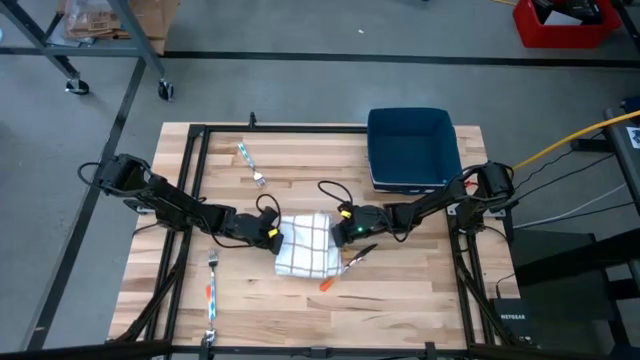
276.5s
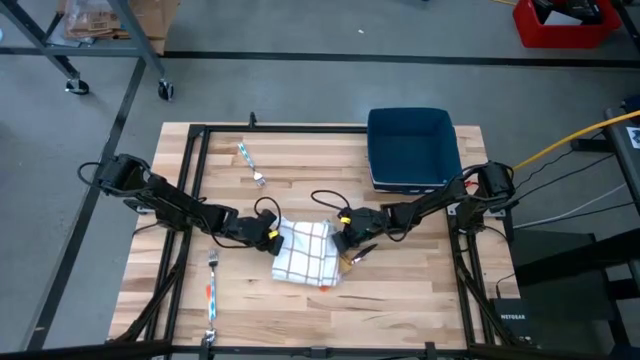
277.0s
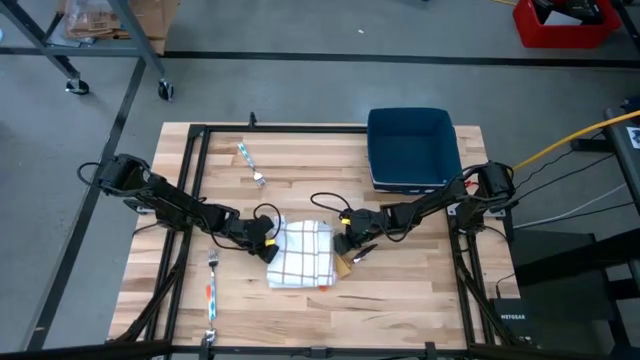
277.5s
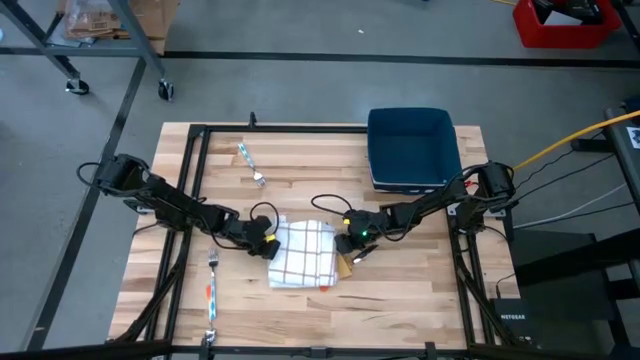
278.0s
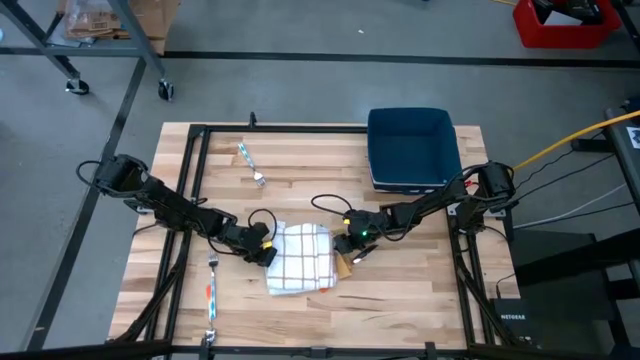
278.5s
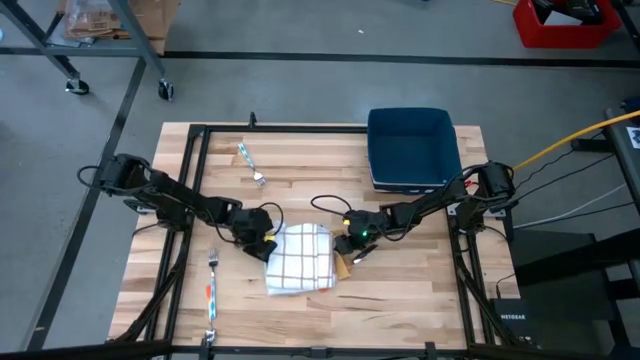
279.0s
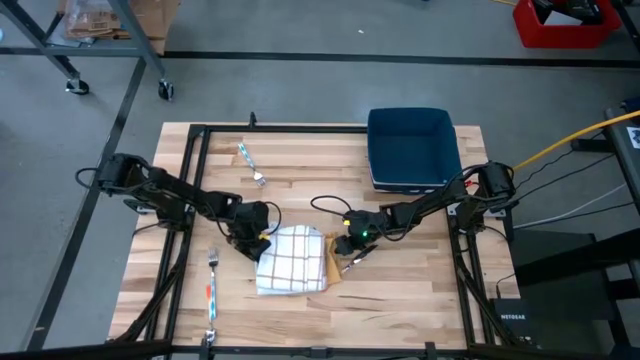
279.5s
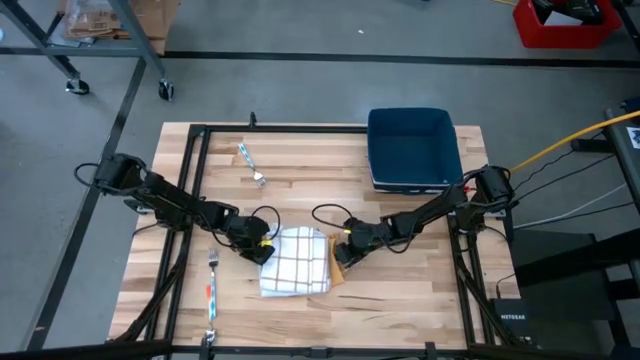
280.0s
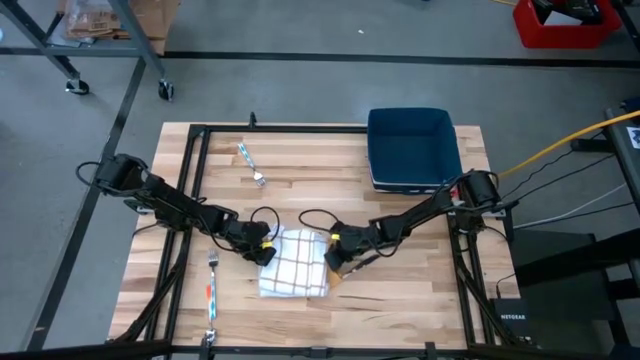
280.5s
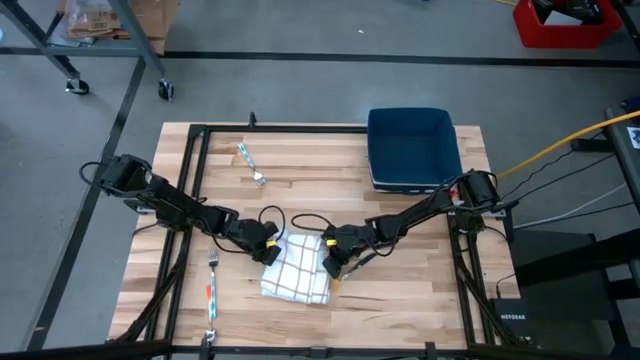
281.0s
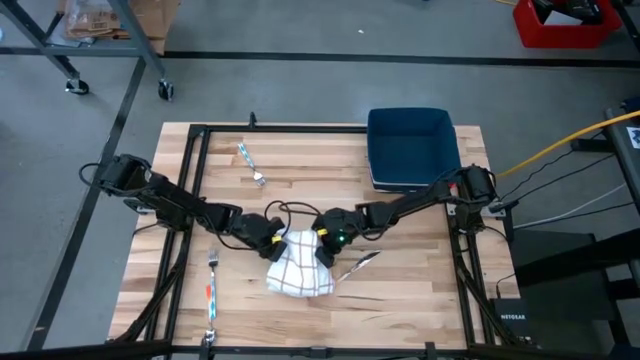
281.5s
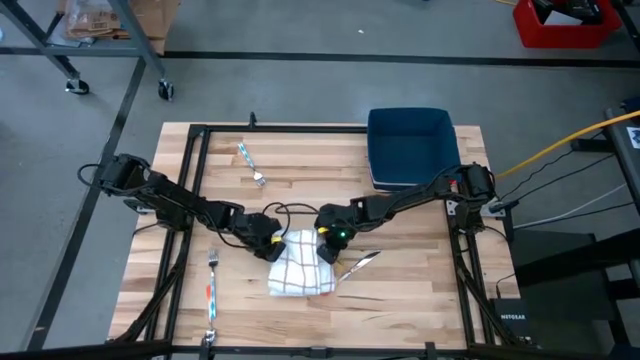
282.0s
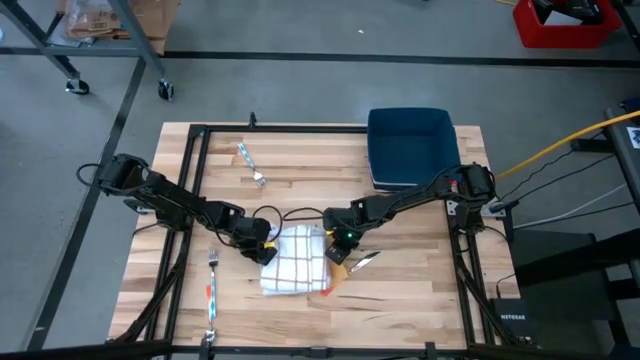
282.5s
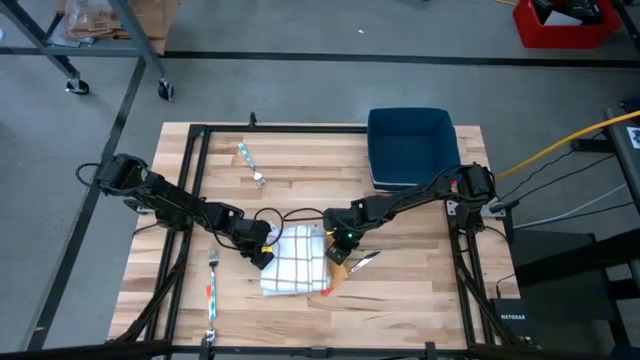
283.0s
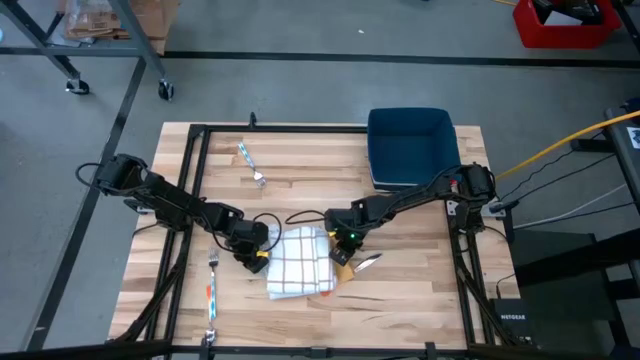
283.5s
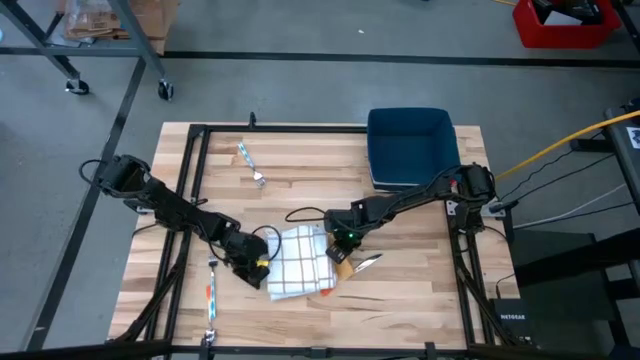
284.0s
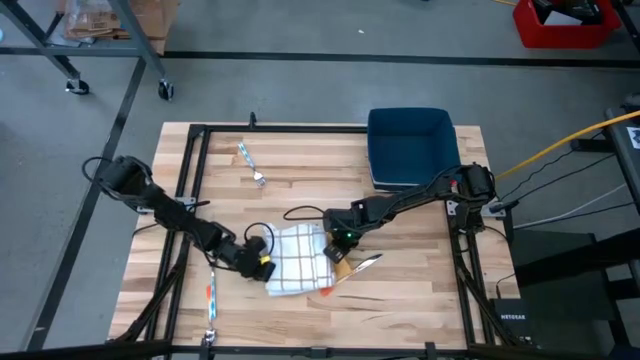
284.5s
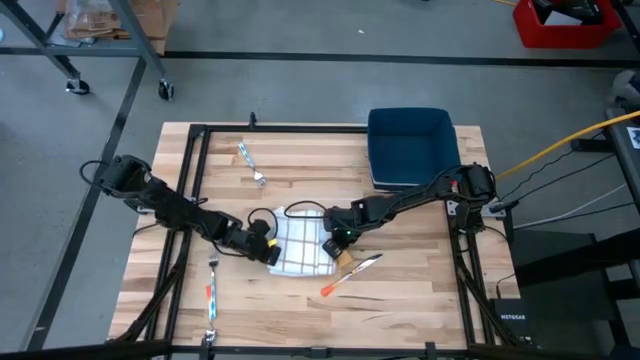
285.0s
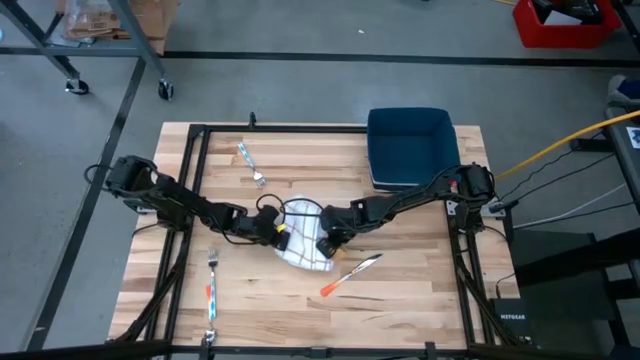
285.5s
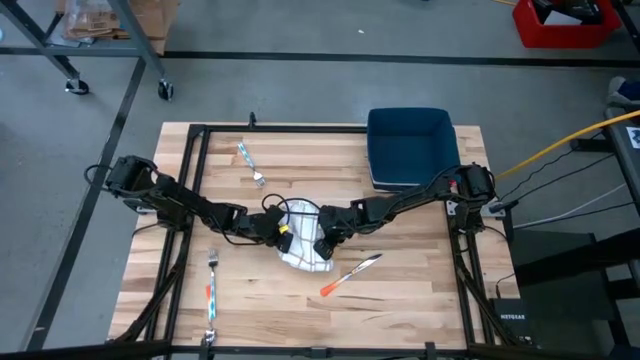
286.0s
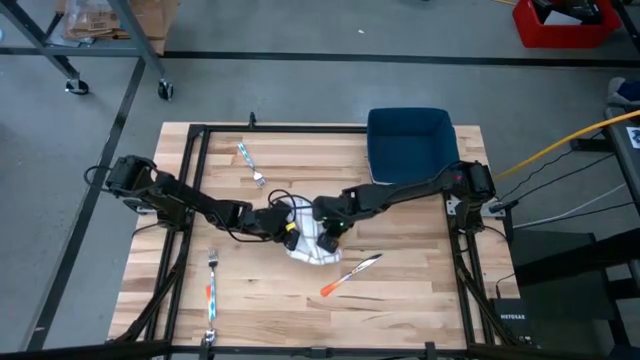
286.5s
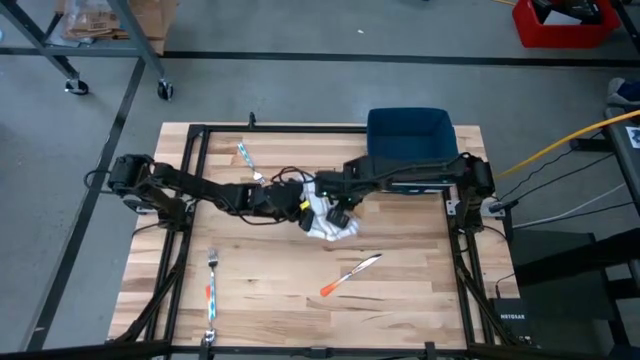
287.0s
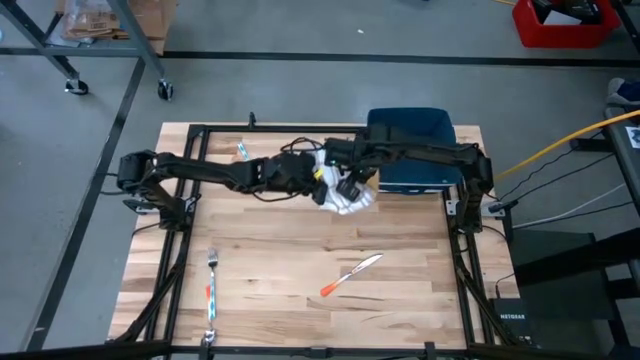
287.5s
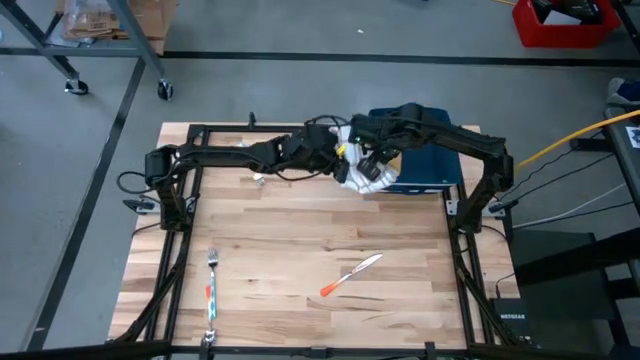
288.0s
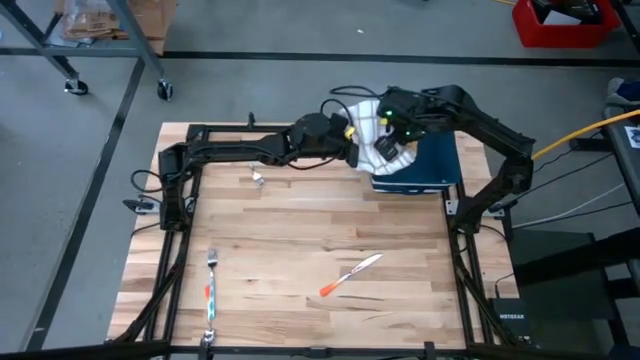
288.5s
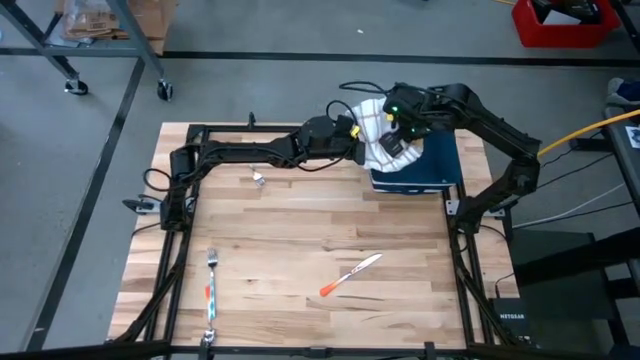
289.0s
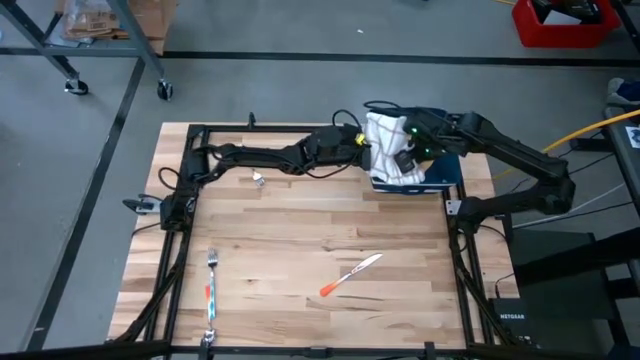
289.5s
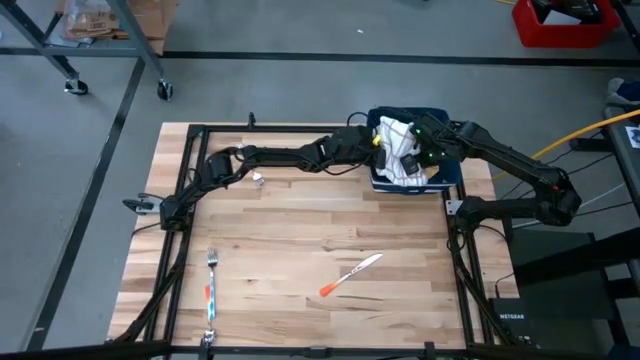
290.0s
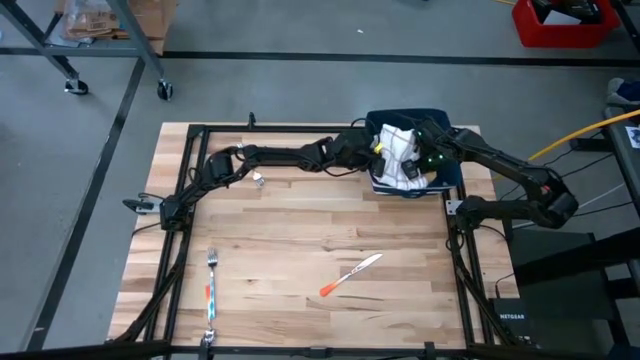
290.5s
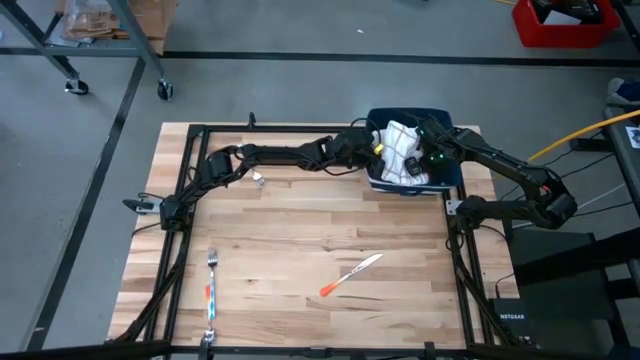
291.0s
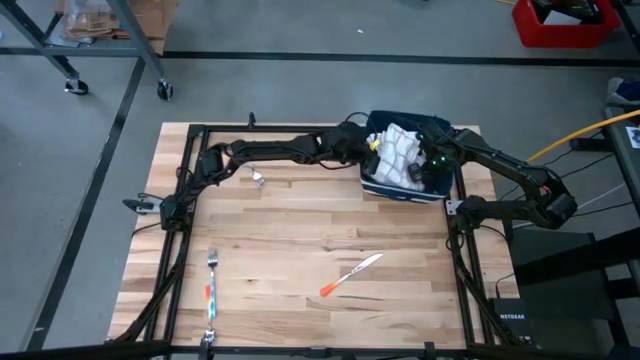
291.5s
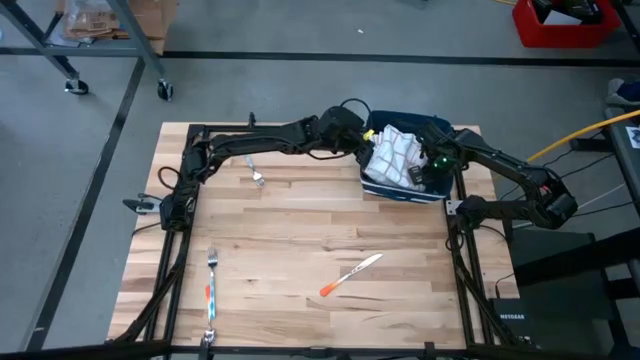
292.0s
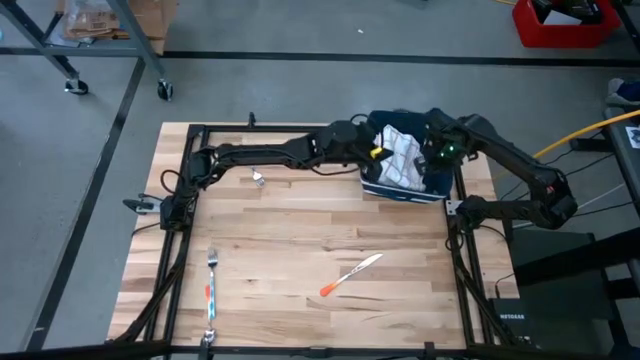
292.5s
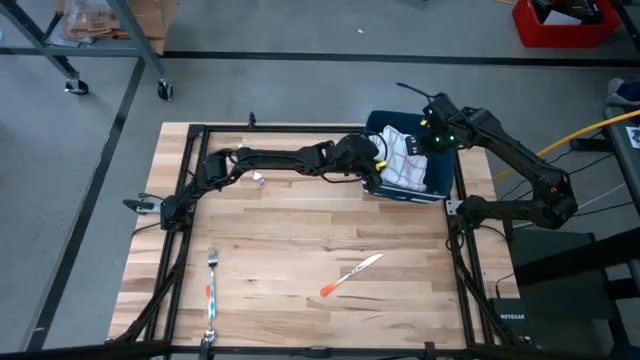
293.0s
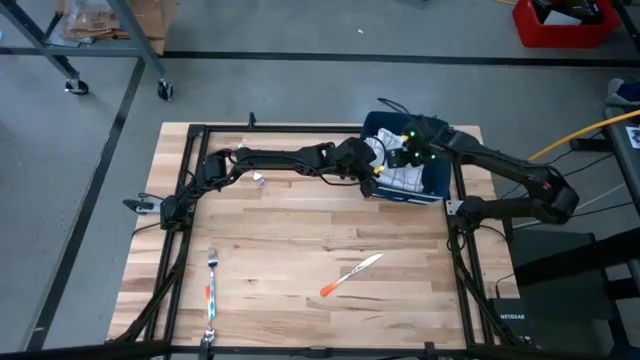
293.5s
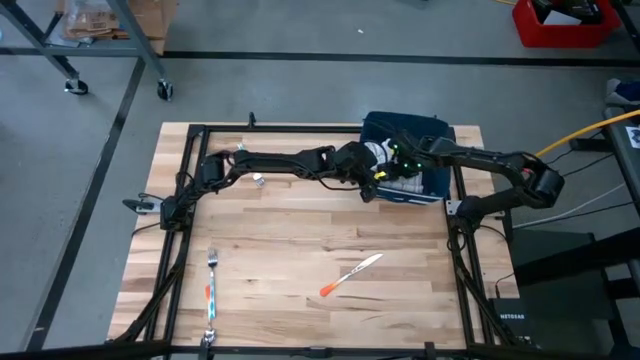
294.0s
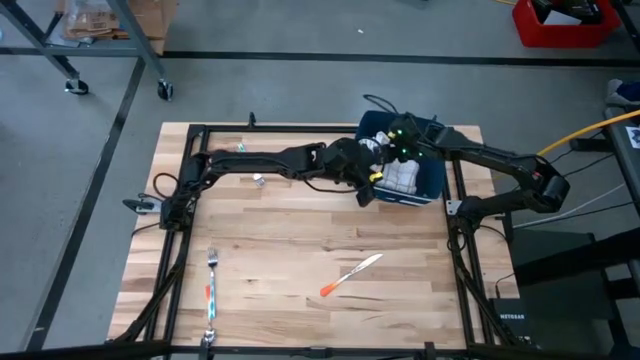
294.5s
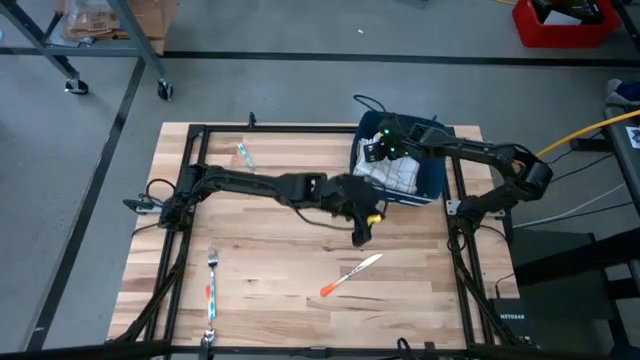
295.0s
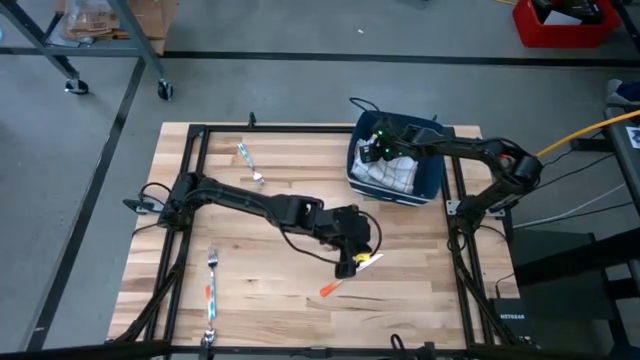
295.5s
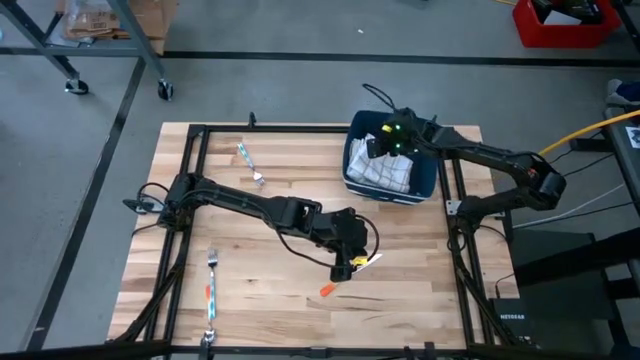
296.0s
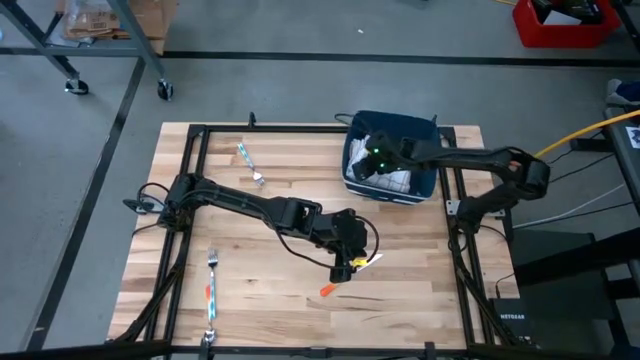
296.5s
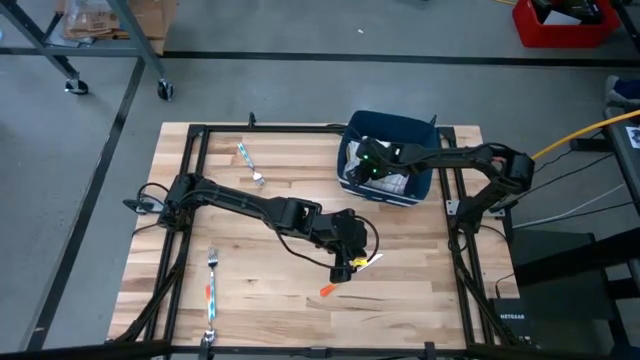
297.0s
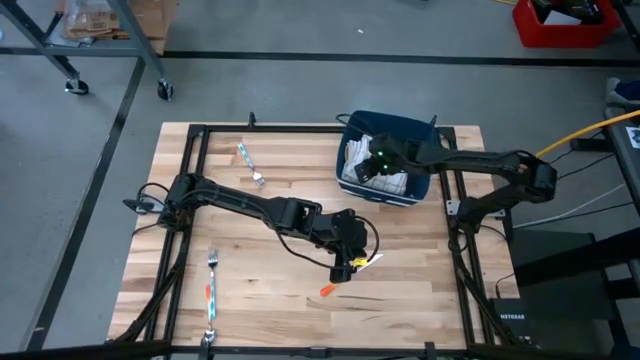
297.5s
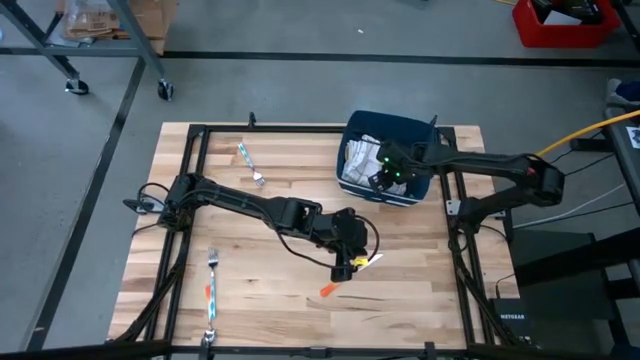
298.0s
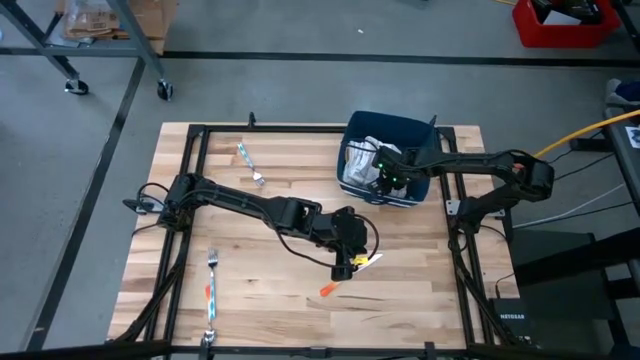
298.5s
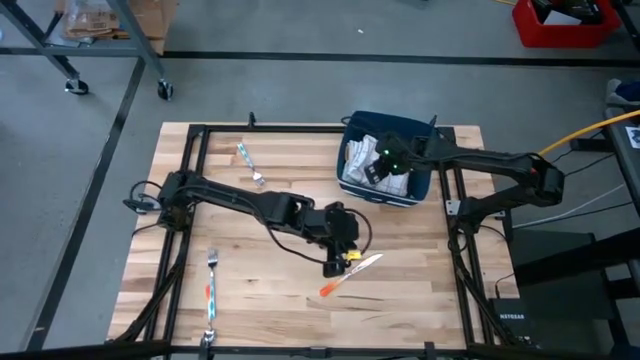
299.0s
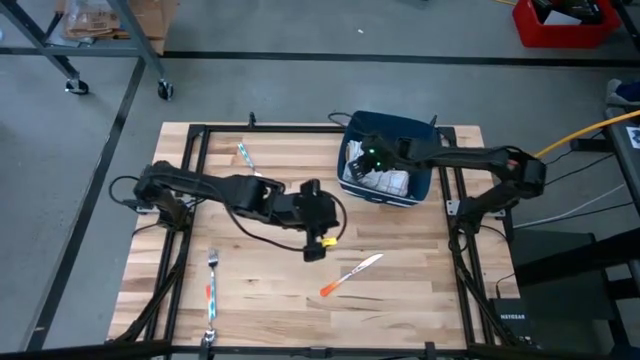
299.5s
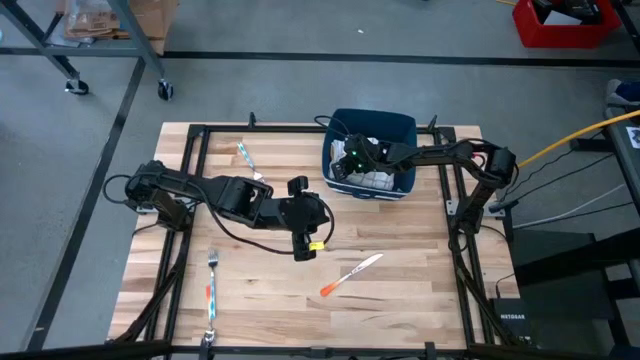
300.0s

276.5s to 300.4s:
Task: Fold towel
Put the stacked folded towels into the blue bin
